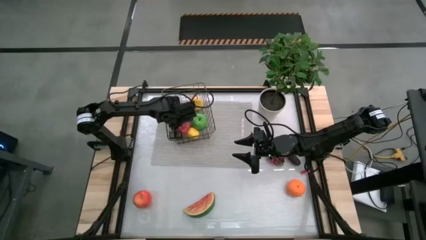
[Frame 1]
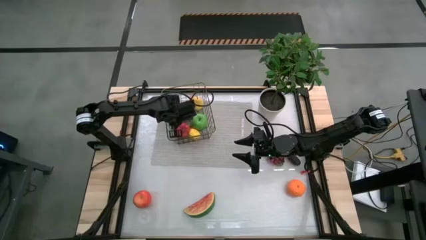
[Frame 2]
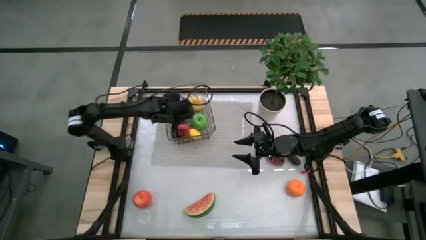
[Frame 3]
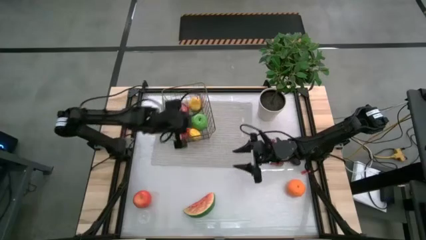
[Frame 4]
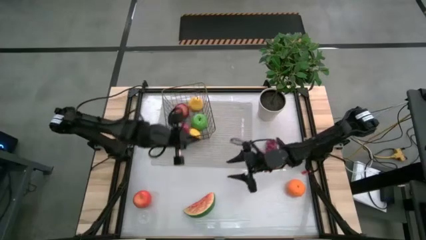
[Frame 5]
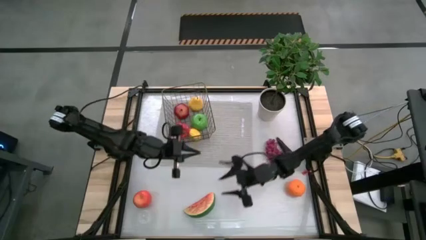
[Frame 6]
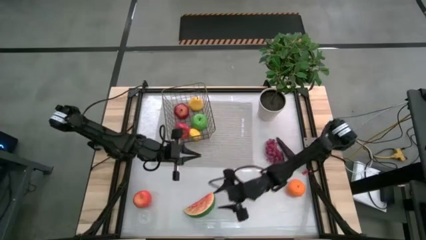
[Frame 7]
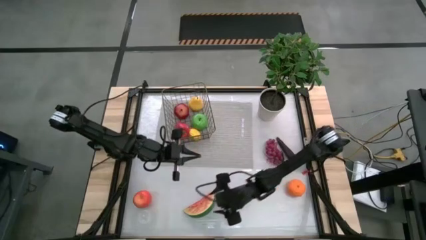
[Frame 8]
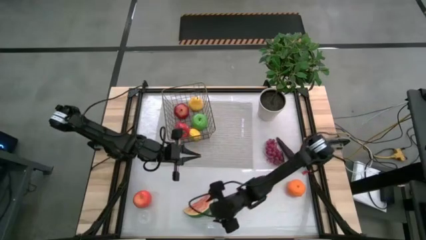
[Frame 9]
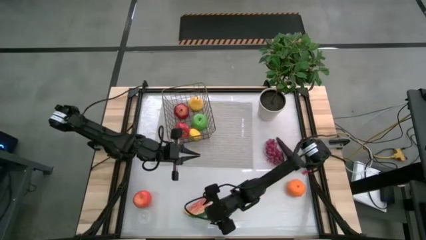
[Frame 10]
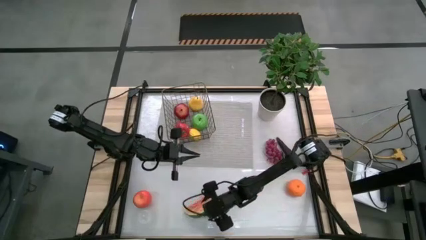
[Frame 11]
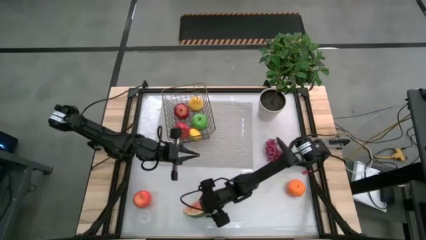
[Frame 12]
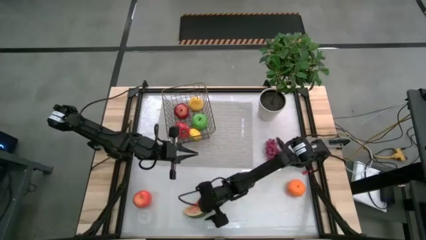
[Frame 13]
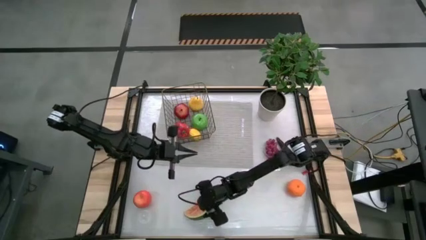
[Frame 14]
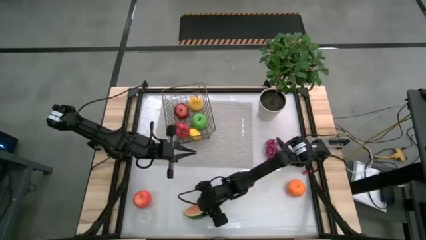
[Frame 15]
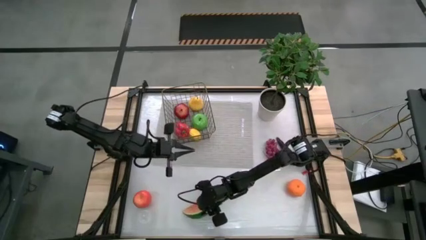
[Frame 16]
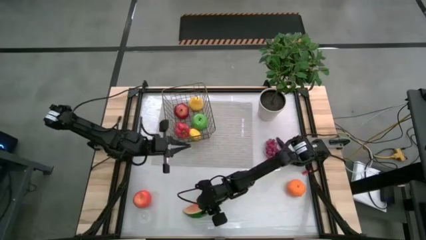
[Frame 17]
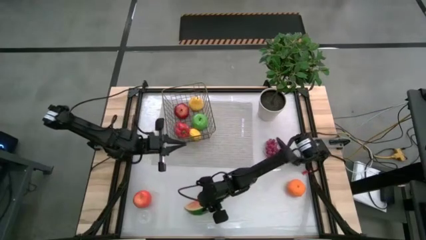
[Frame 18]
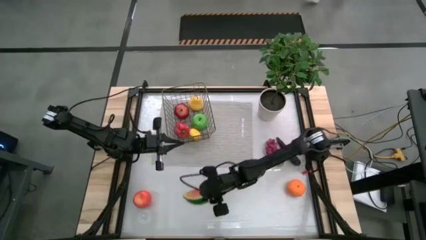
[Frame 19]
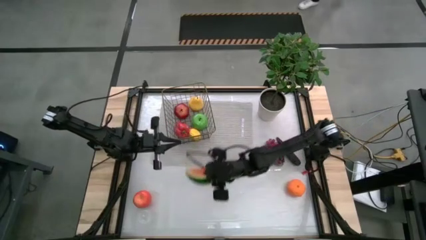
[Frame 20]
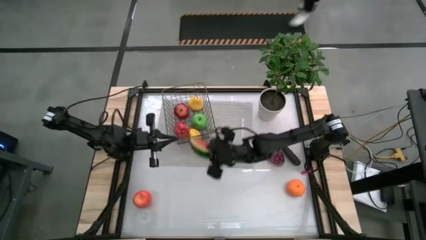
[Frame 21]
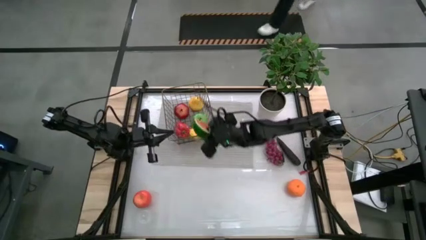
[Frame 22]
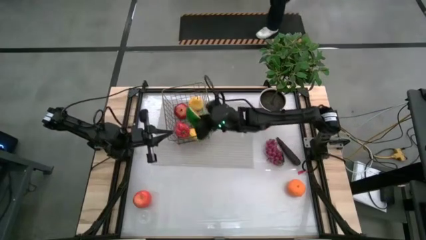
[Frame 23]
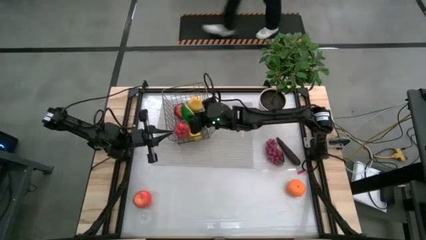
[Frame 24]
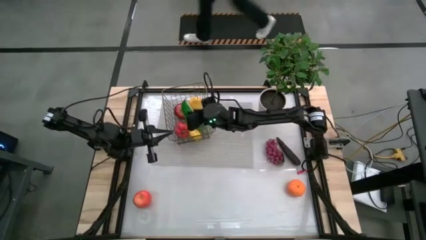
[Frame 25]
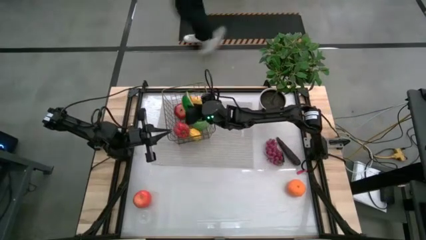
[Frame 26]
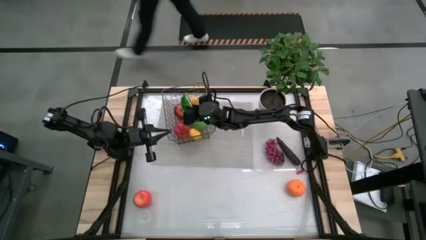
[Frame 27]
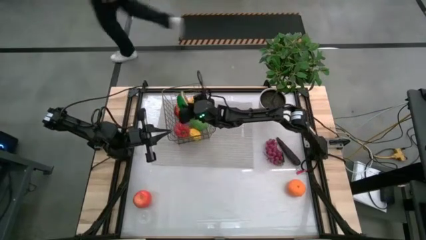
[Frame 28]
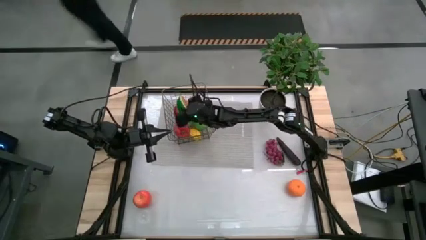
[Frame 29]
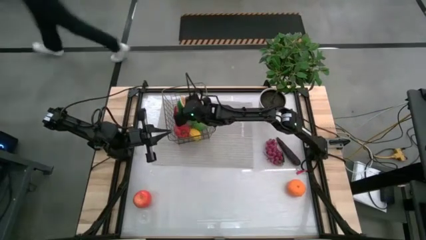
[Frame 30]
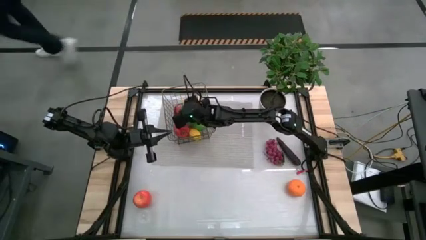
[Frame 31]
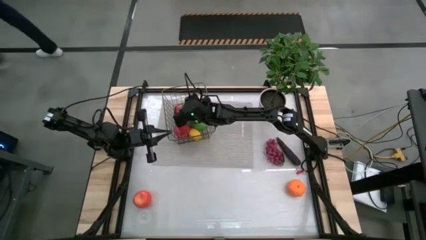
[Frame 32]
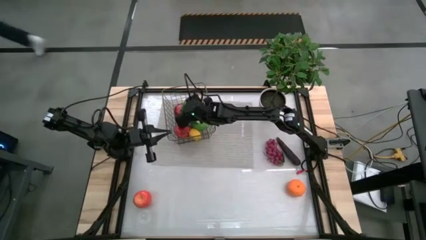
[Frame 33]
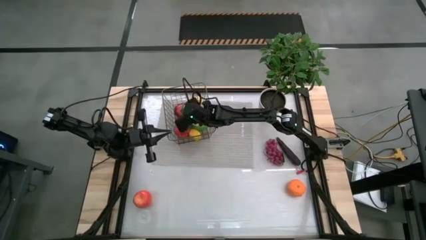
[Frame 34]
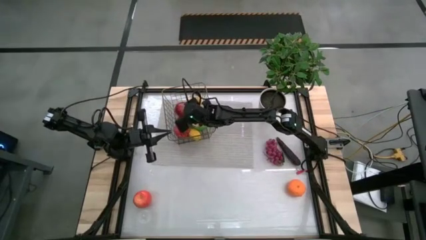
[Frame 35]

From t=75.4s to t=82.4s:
Task: Build produce basket
Put the red sliced watermelon into the brown wire basket

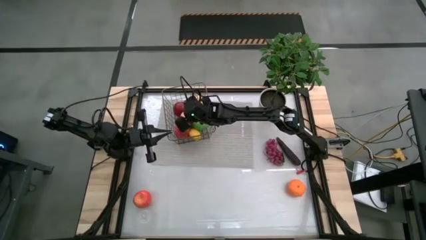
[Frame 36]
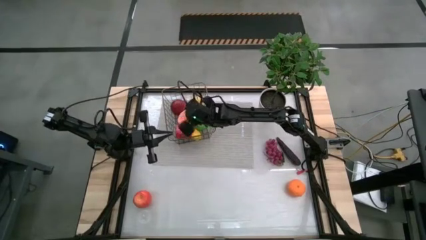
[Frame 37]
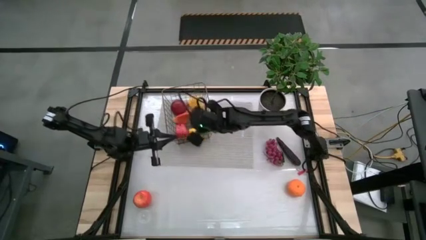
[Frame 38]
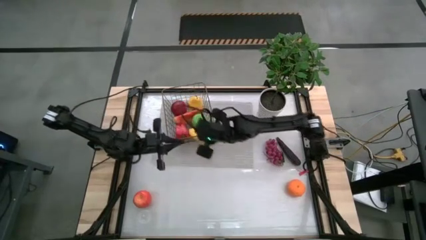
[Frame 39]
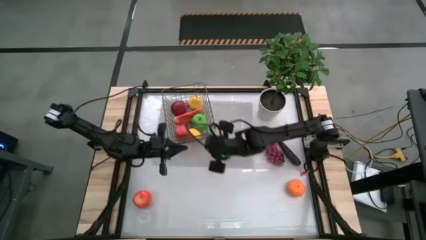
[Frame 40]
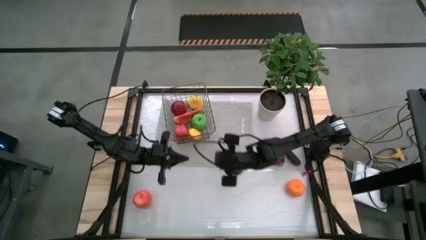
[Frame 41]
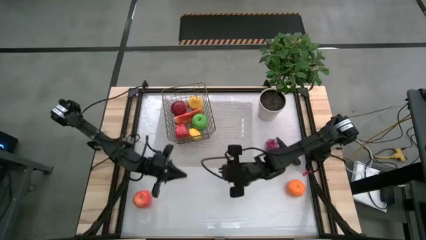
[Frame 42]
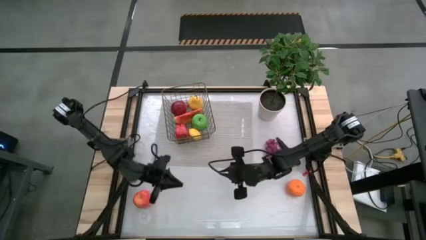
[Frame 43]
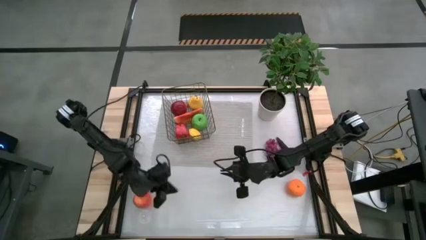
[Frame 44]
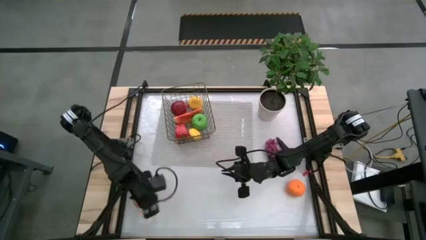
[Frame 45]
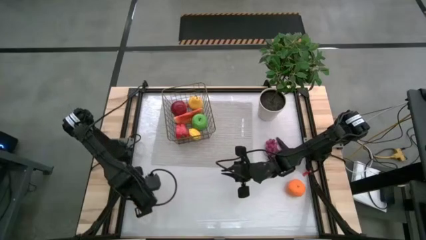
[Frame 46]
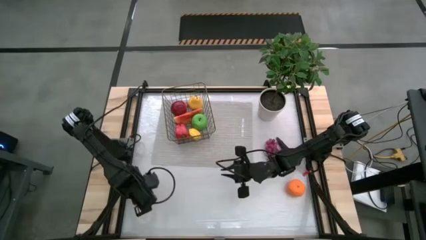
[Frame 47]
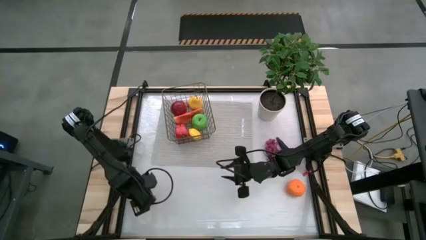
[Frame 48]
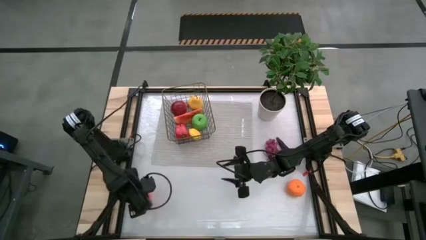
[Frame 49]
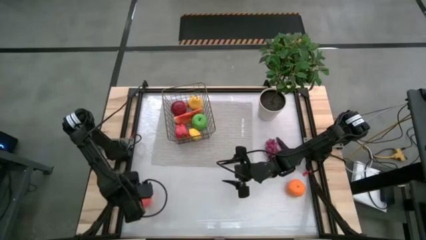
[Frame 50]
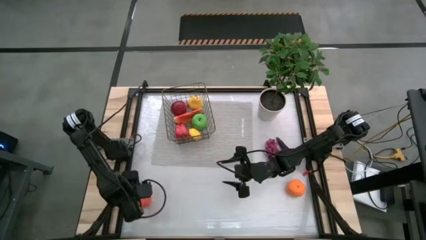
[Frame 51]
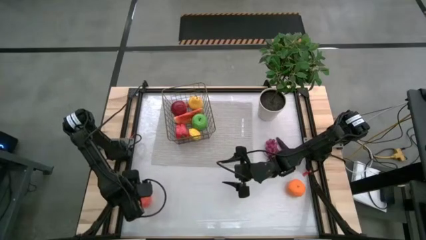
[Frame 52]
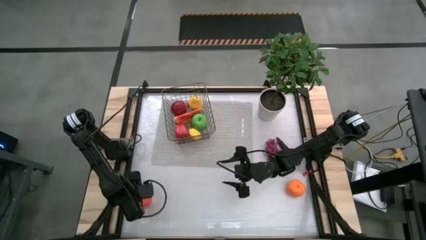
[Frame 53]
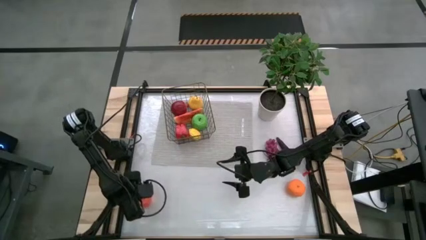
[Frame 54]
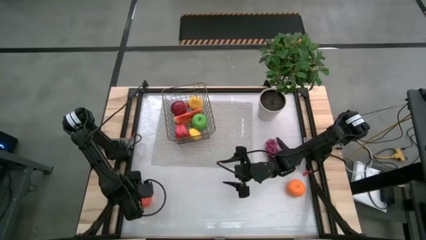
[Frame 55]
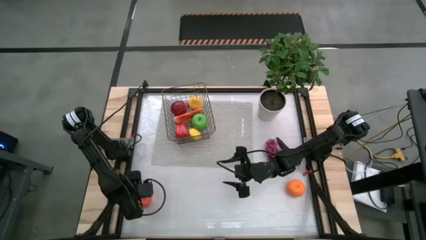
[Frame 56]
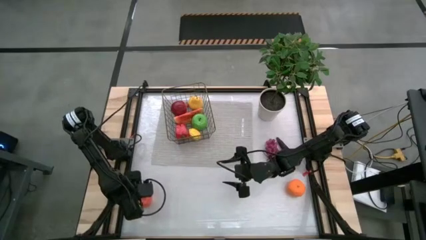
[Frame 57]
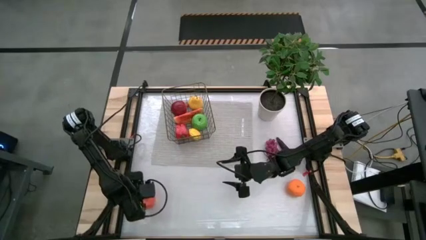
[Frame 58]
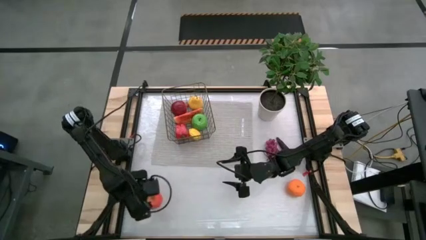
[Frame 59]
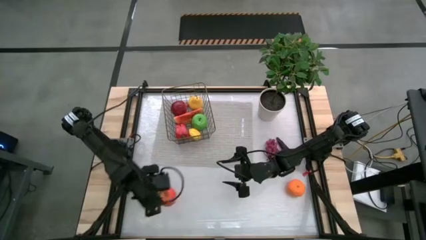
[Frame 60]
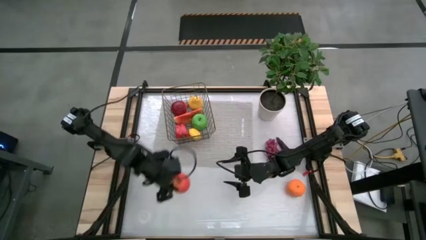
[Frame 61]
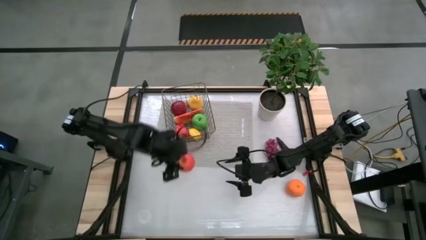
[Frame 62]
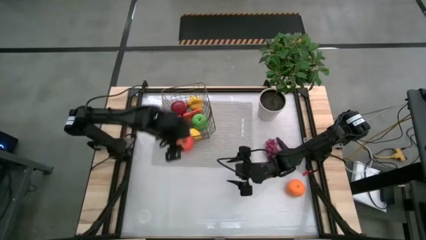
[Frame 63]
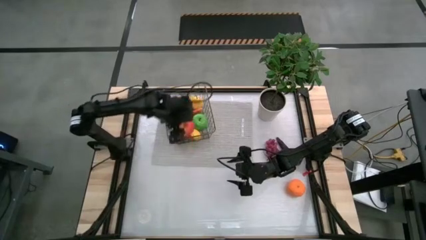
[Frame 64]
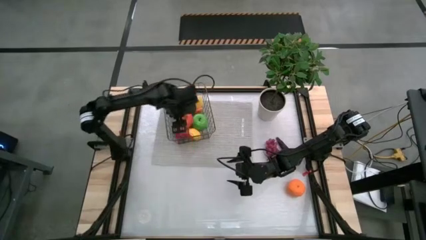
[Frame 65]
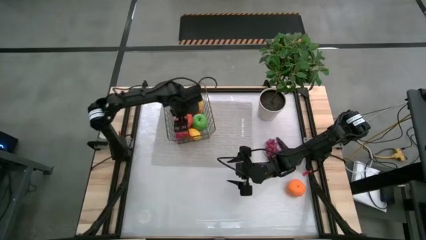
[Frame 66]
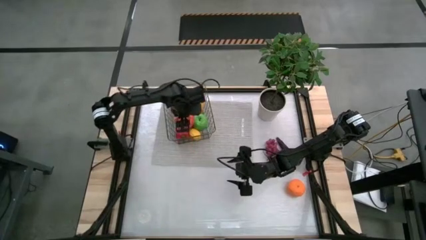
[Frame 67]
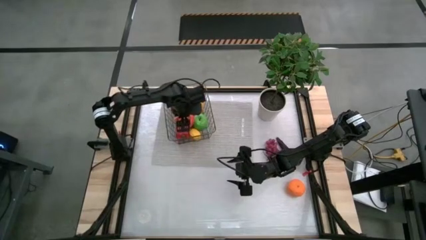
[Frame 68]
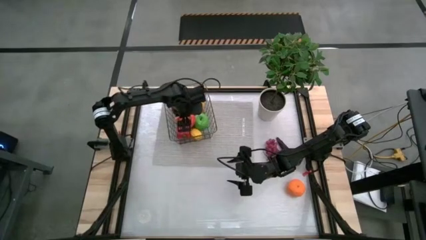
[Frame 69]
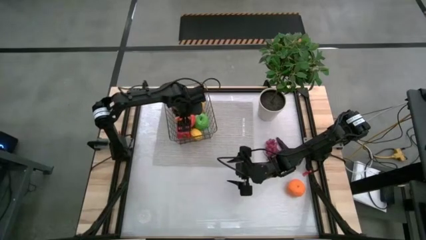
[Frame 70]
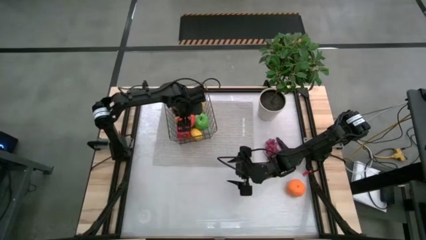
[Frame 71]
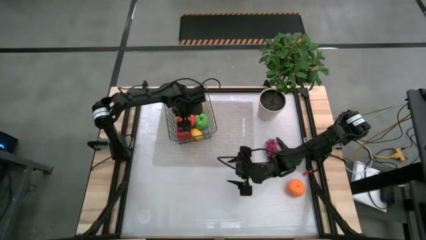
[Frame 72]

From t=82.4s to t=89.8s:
Put the red apple into the brown wire basket
